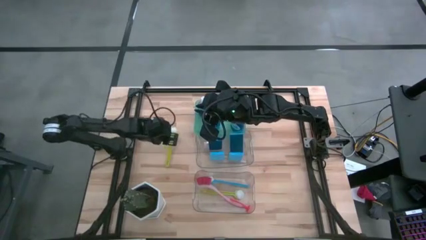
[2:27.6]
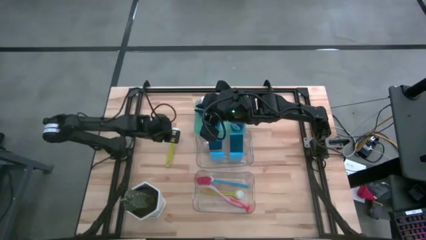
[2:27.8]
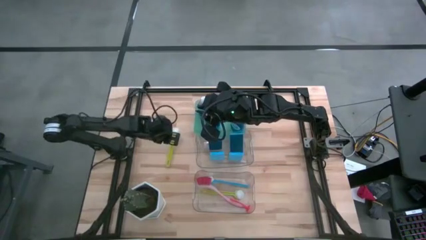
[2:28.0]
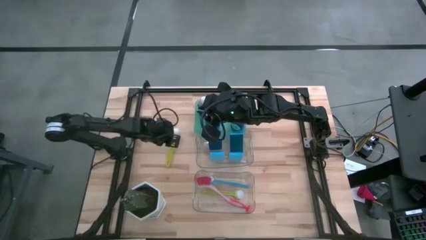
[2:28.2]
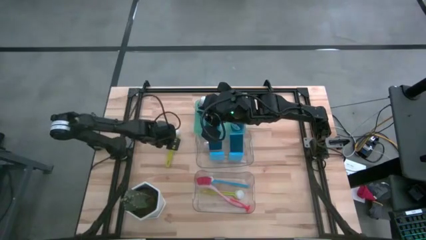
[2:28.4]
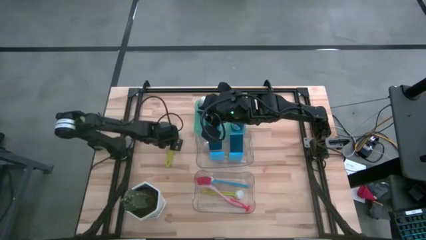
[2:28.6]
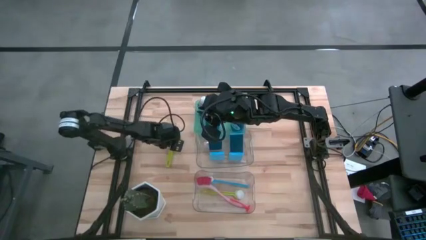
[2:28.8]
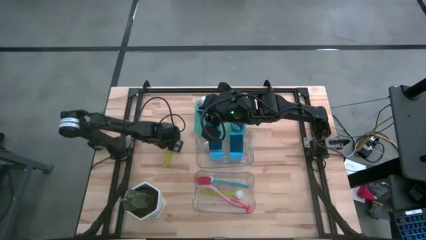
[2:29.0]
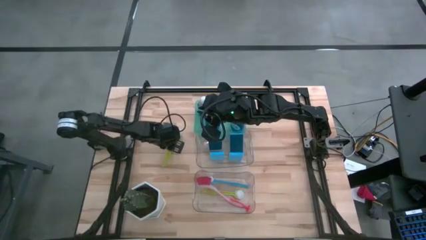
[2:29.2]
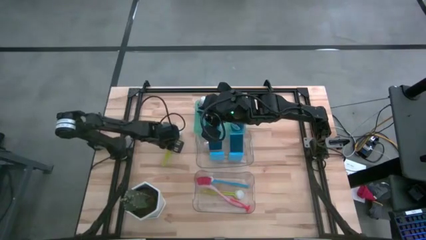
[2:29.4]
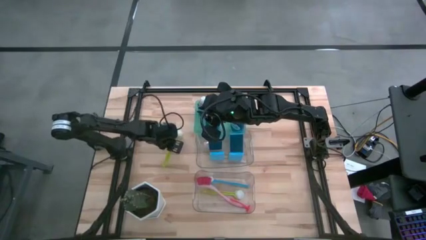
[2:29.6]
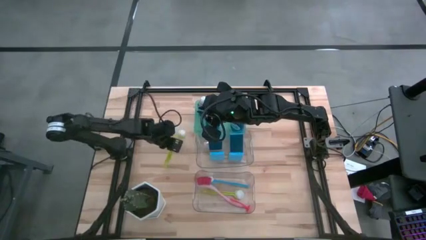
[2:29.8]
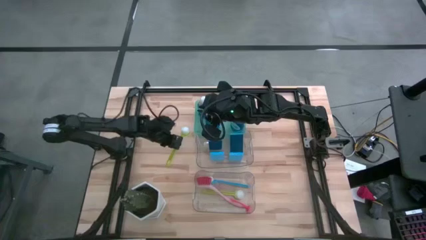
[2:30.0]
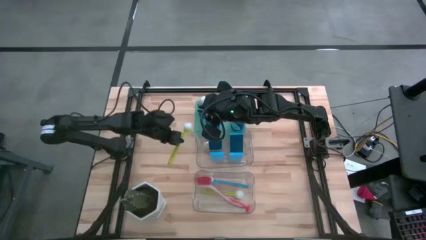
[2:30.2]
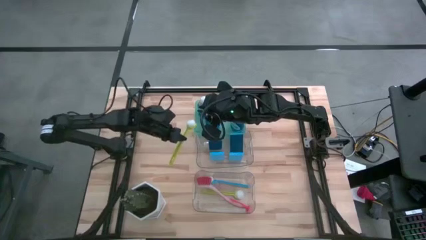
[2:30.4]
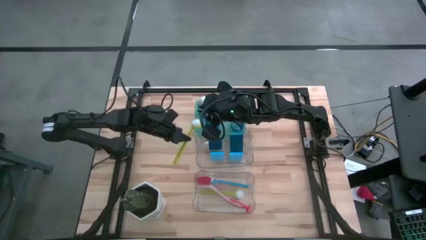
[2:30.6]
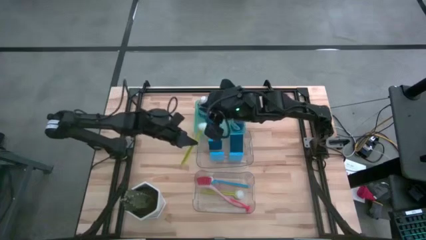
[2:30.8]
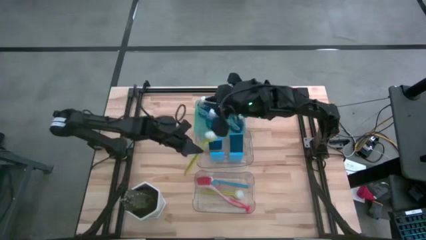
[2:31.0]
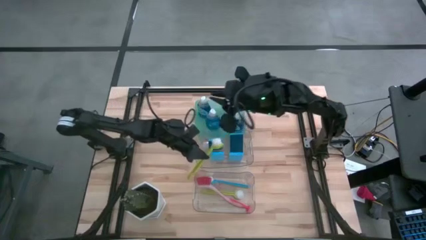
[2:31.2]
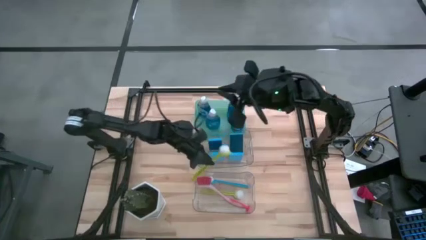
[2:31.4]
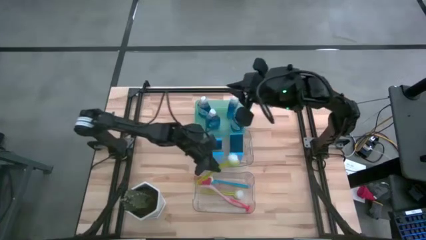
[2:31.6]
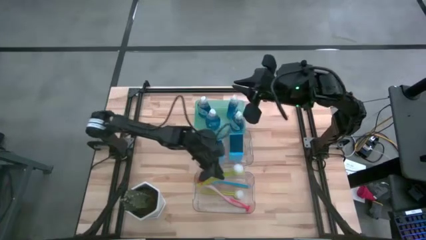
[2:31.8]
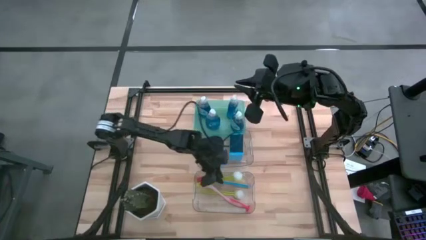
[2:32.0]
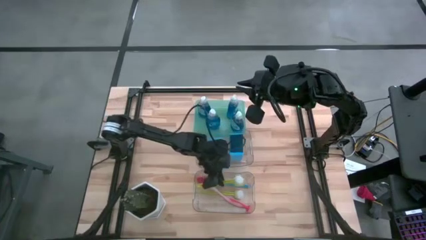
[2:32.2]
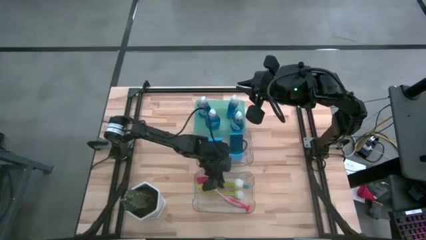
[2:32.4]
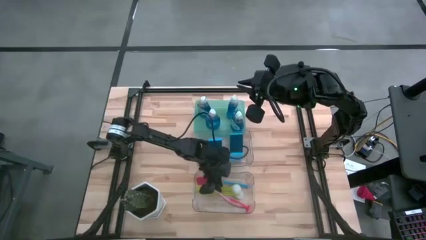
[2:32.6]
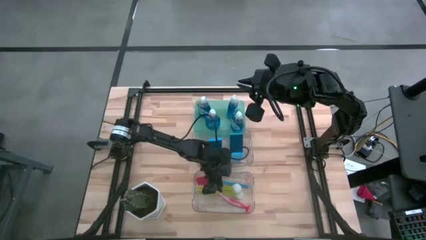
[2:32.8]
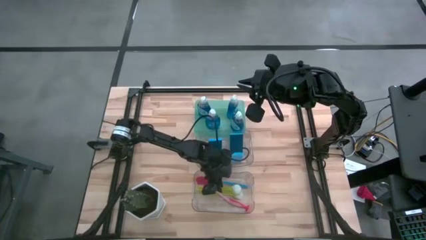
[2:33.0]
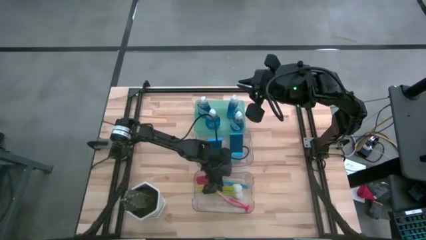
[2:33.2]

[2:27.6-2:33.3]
Task: Pick & Place Kitchen Sink Supplies
Put the light green dish brush into the bottom transparent bin

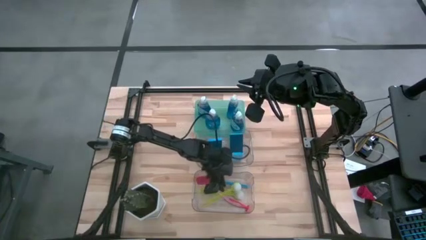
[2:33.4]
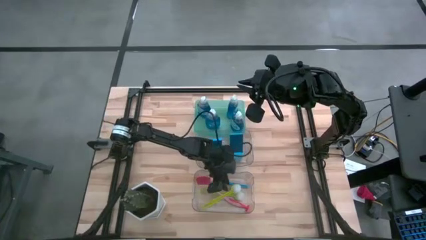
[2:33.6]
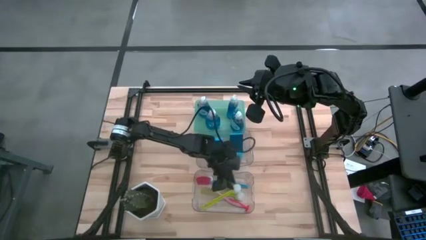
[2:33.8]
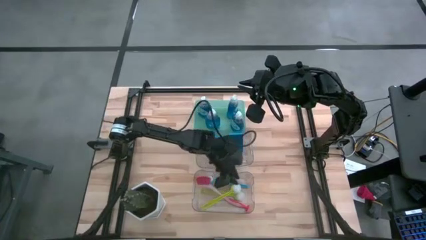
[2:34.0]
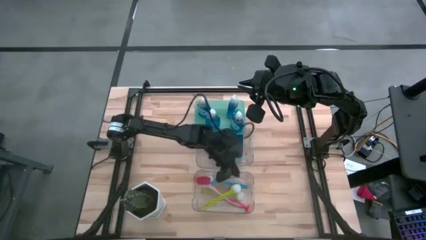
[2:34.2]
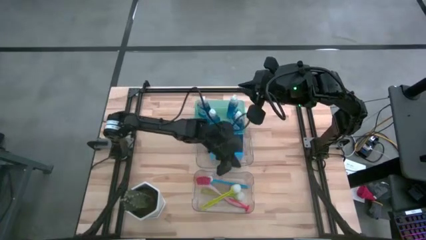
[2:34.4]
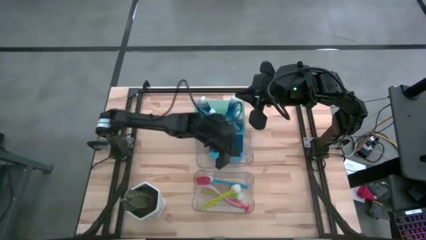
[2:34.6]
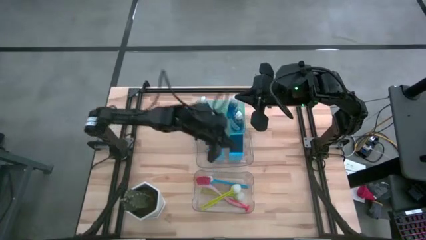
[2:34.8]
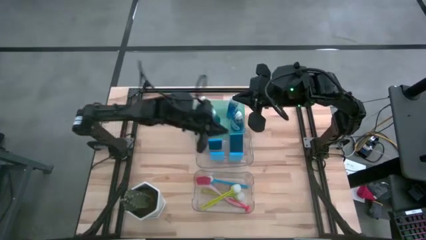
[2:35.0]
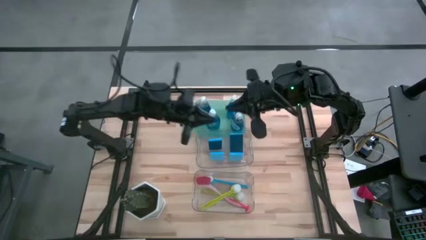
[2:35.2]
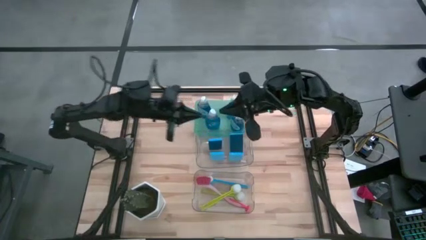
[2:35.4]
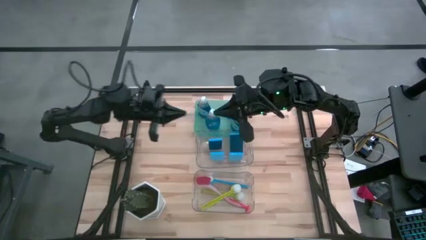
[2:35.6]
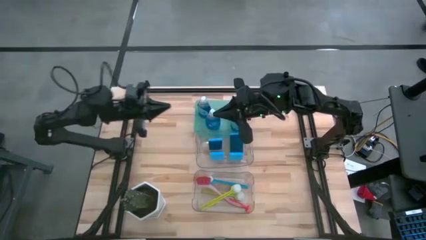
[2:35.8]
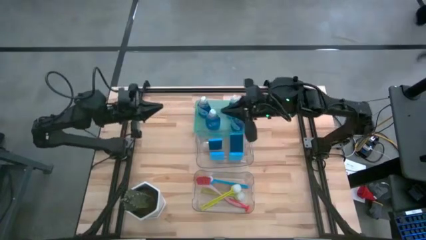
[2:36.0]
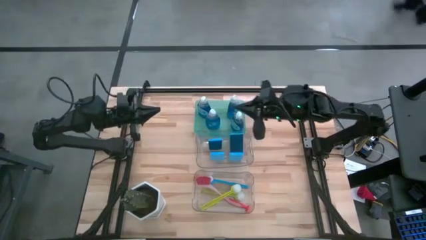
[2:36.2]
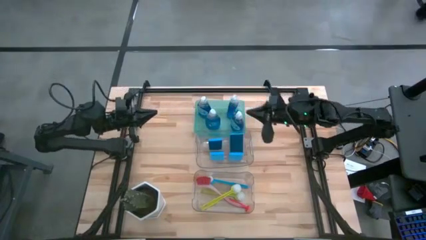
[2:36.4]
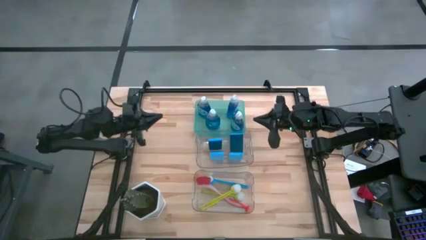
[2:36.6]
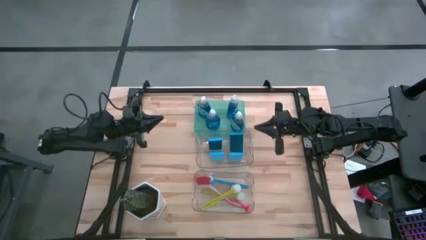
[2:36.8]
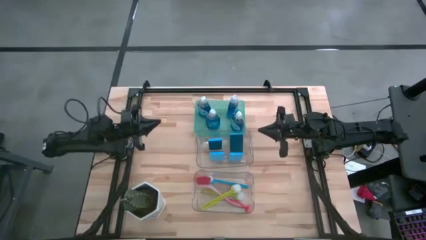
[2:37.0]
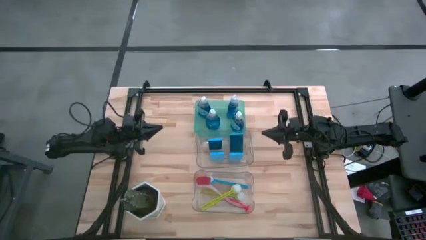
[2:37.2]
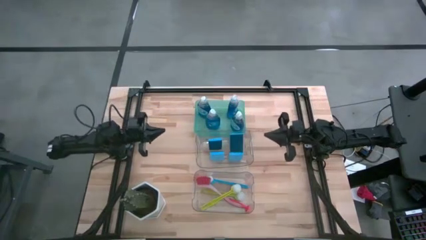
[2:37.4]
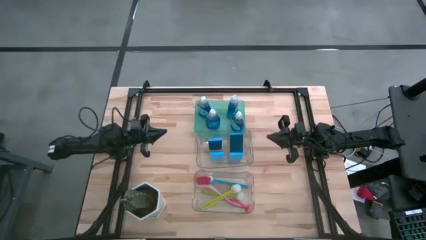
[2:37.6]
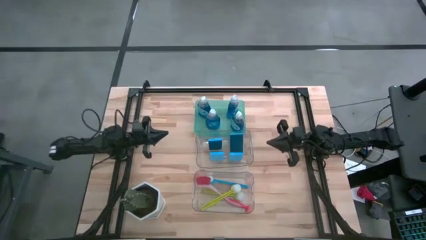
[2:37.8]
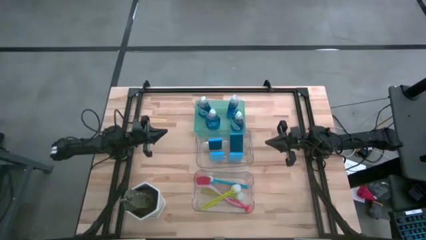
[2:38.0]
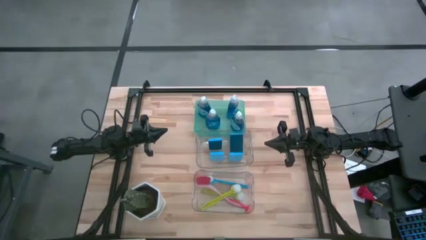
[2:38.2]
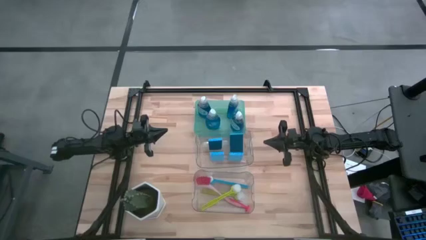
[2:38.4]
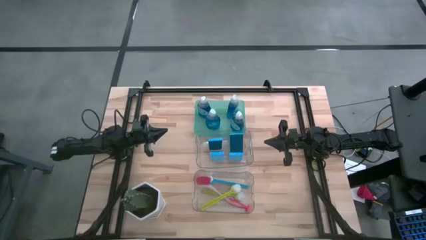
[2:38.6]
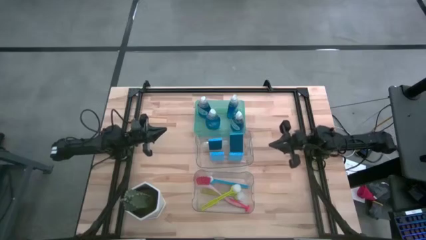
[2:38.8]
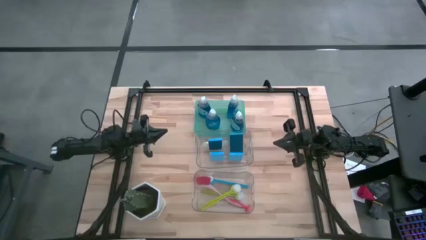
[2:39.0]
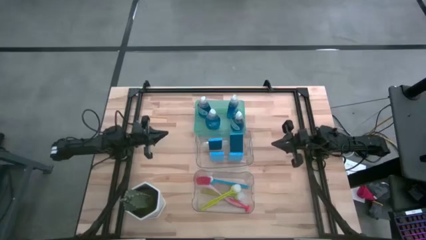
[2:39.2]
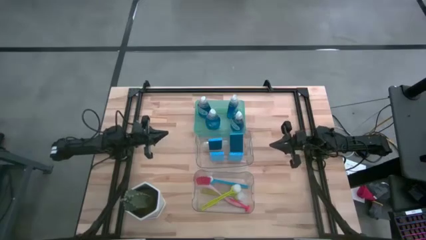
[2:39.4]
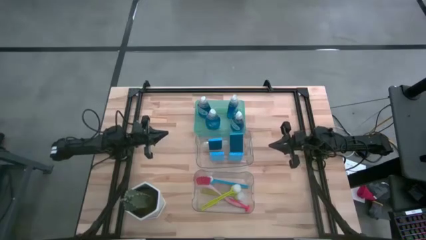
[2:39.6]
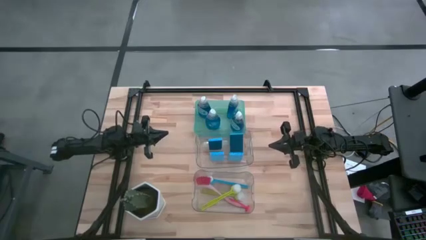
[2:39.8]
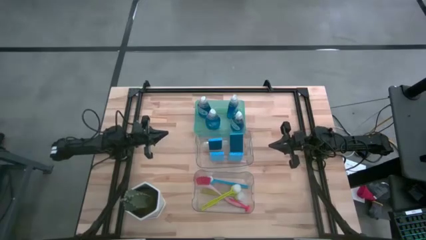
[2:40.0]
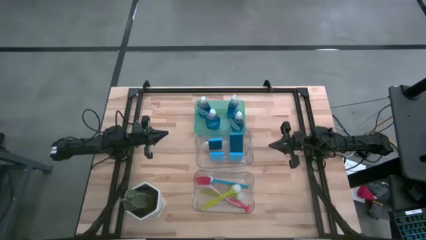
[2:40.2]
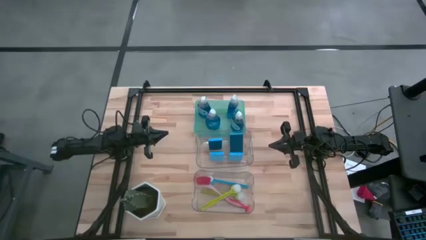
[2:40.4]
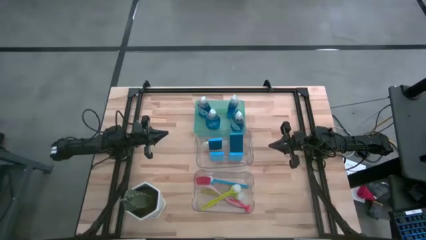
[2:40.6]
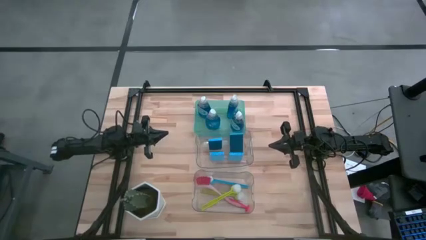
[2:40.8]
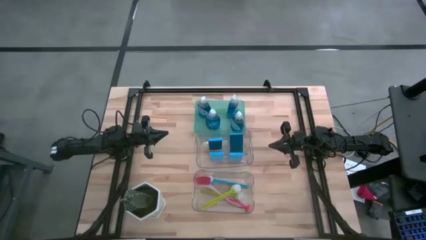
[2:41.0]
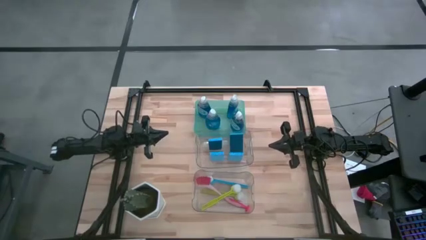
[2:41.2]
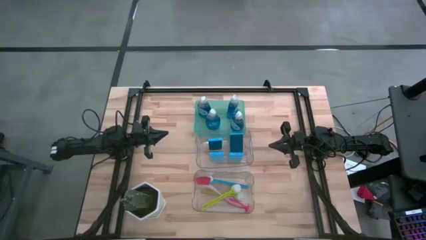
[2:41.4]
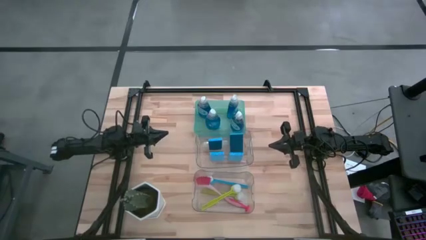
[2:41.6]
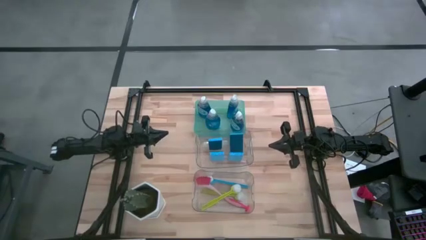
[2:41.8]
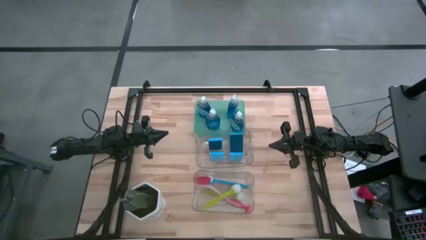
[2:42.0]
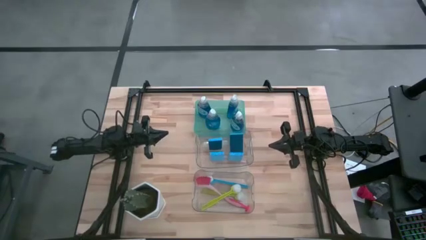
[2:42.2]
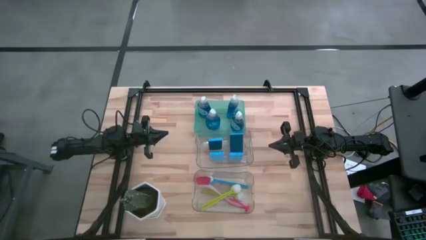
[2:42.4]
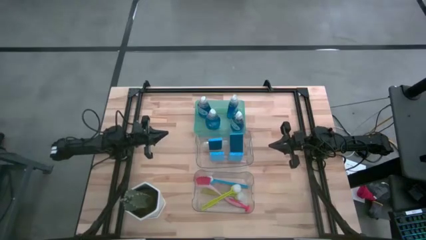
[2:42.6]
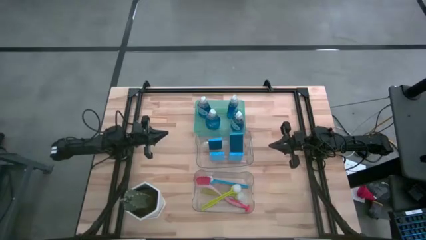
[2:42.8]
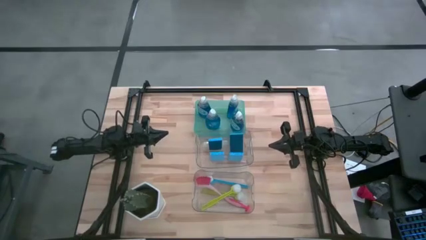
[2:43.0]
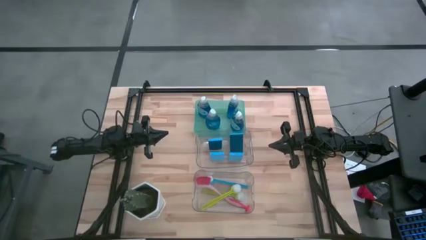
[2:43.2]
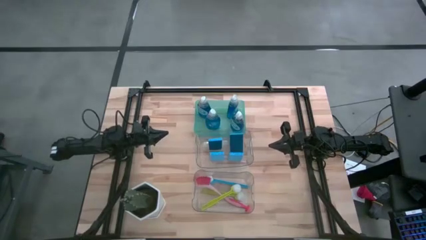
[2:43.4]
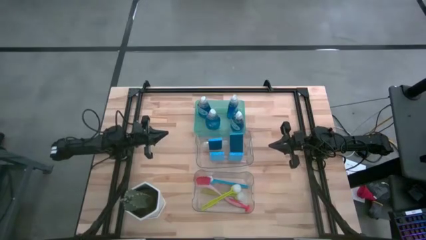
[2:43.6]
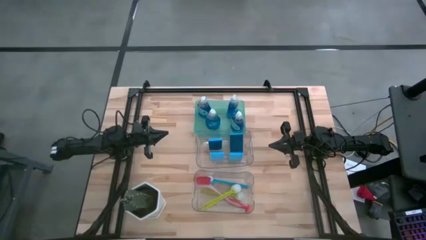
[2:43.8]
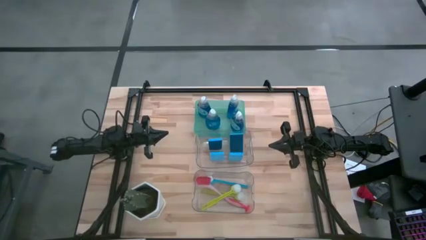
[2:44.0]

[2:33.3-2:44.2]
Return to Home Position
